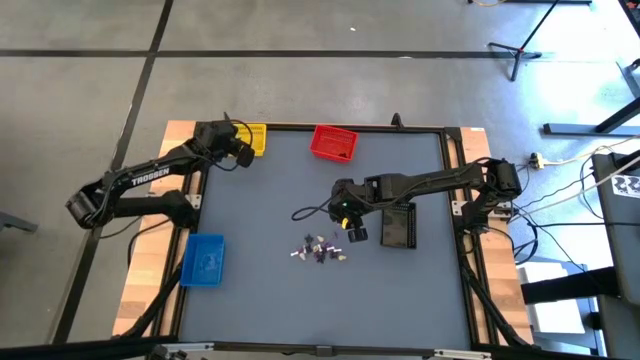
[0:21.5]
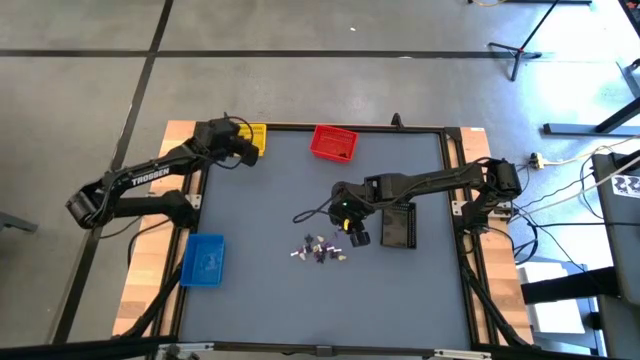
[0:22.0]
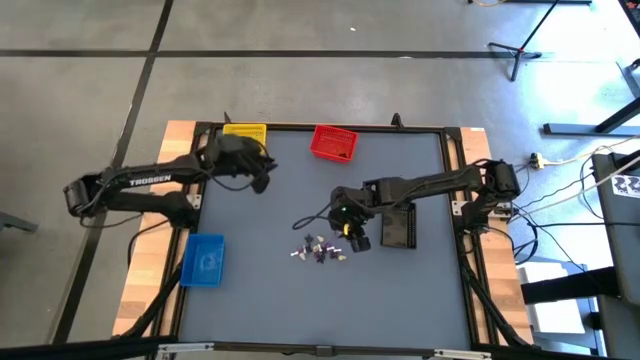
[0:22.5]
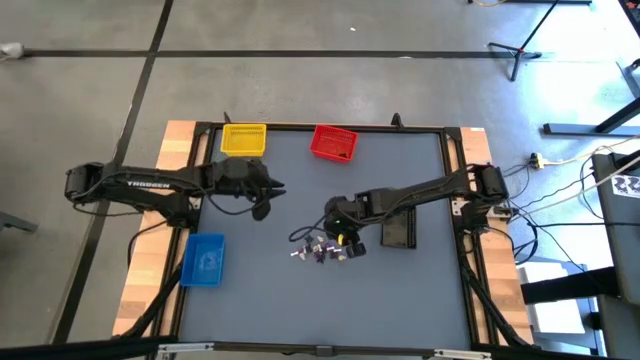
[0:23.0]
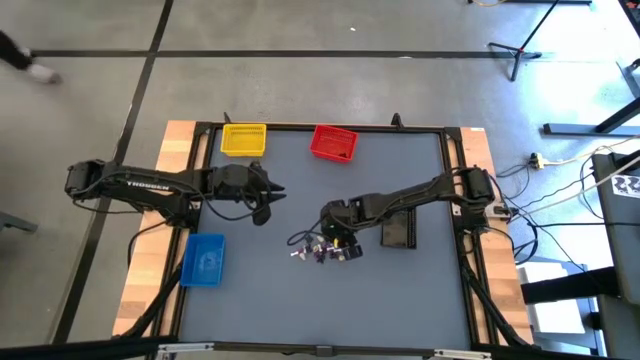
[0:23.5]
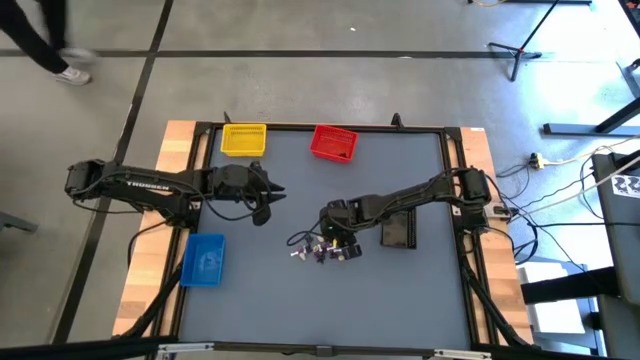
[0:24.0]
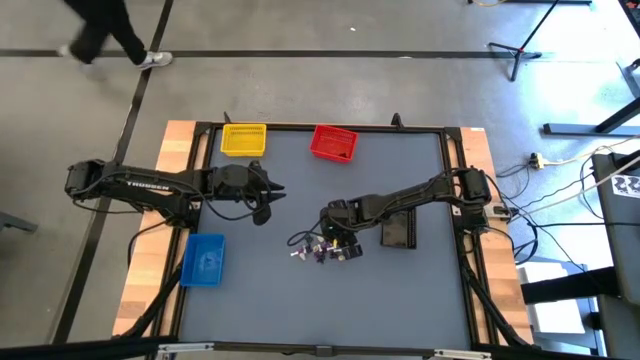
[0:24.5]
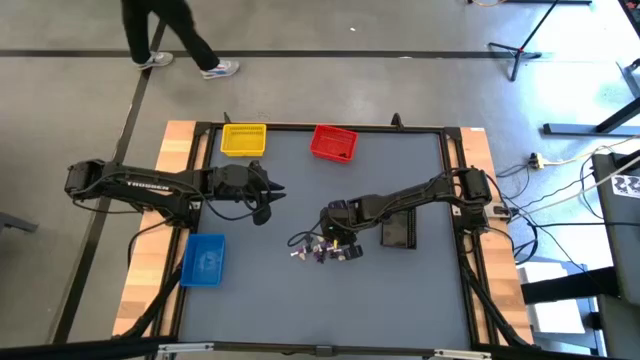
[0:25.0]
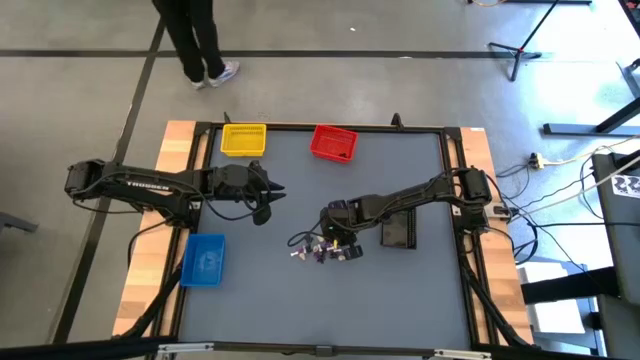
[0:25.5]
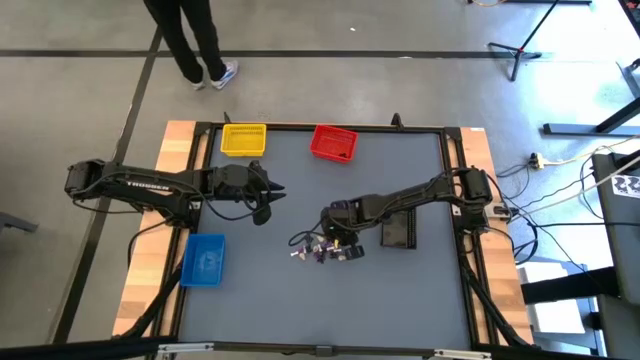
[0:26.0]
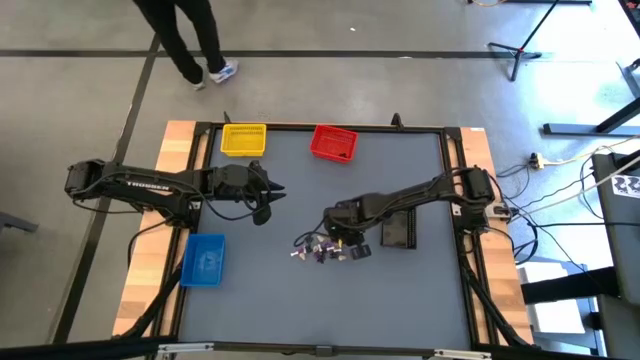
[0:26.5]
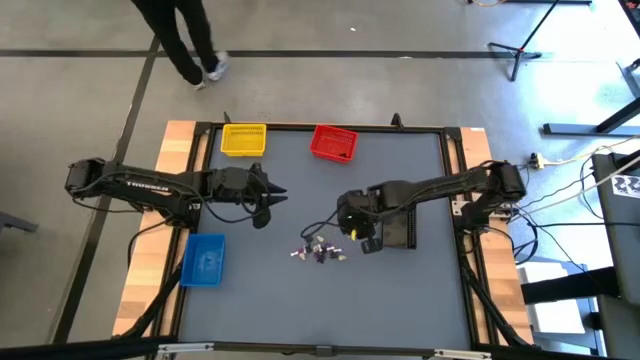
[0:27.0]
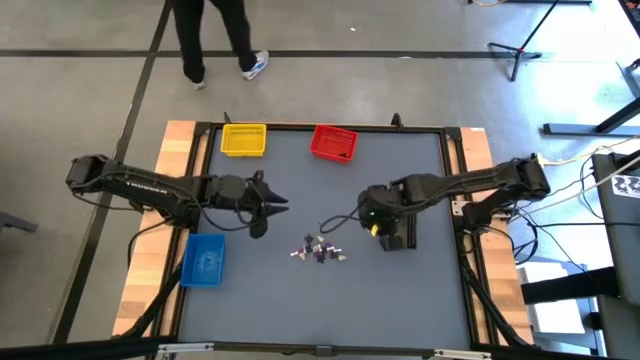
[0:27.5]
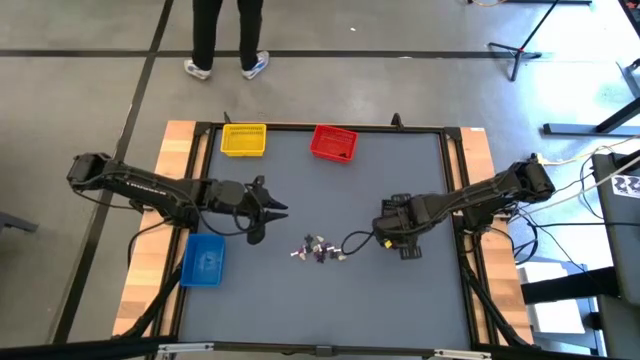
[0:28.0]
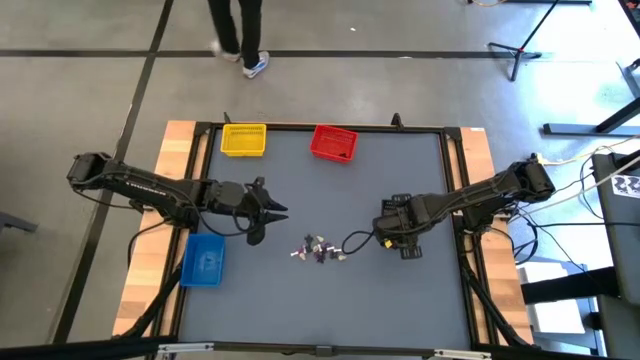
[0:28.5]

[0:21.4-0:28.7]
Task: Sort Halloween decoration
Put the purple hat toy into the black bin

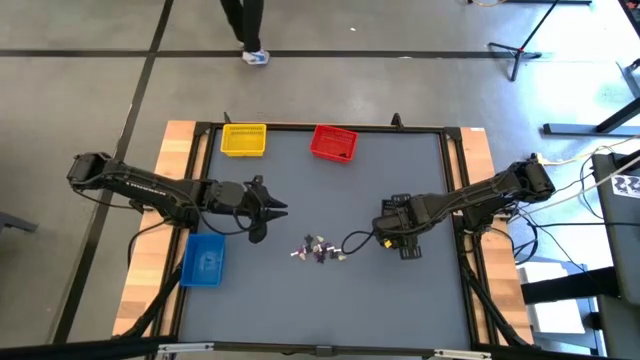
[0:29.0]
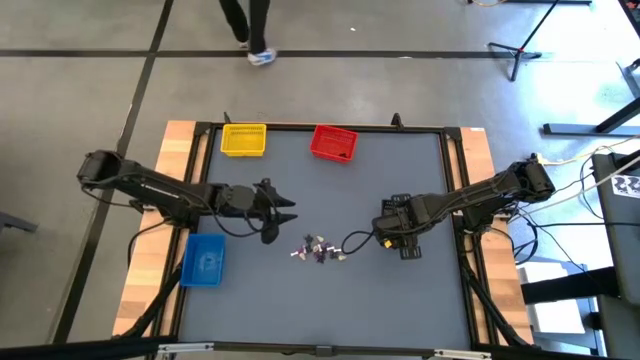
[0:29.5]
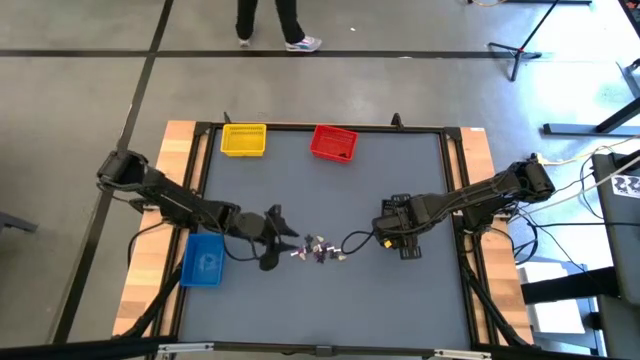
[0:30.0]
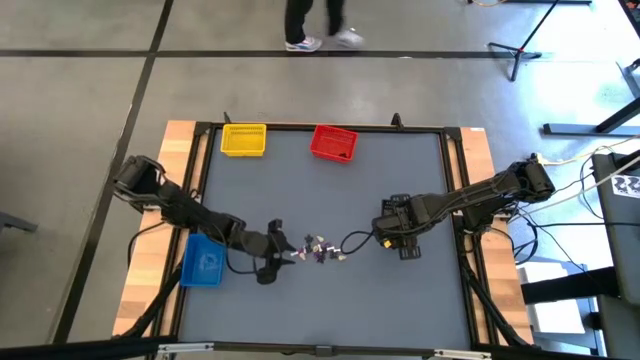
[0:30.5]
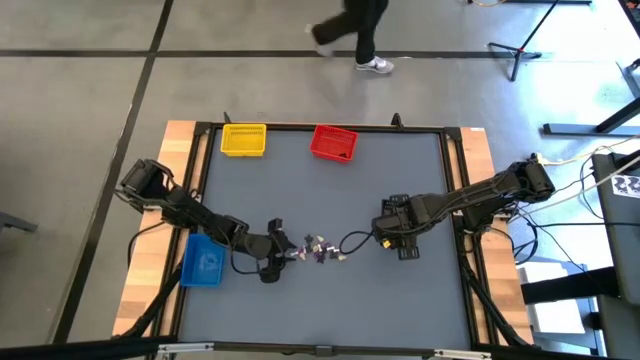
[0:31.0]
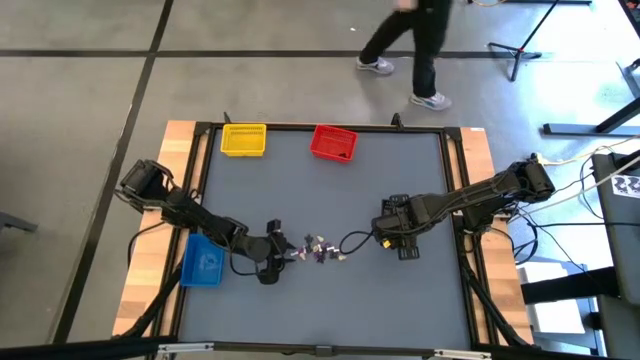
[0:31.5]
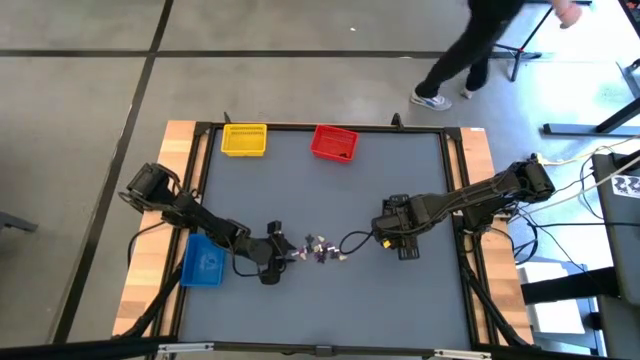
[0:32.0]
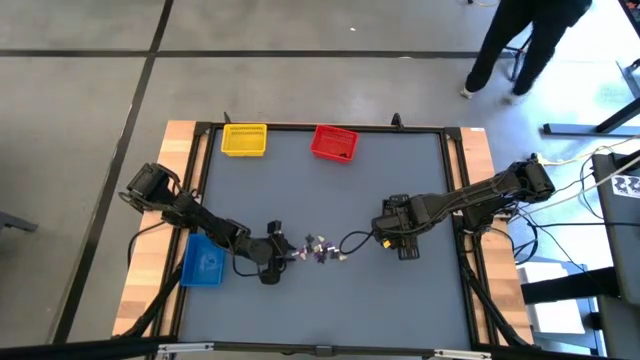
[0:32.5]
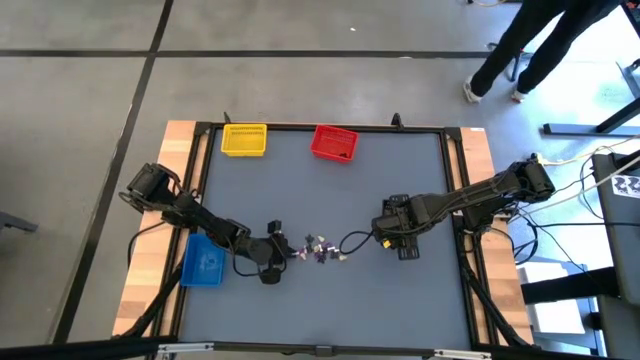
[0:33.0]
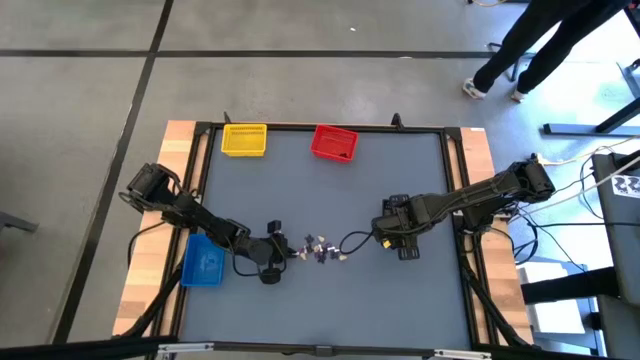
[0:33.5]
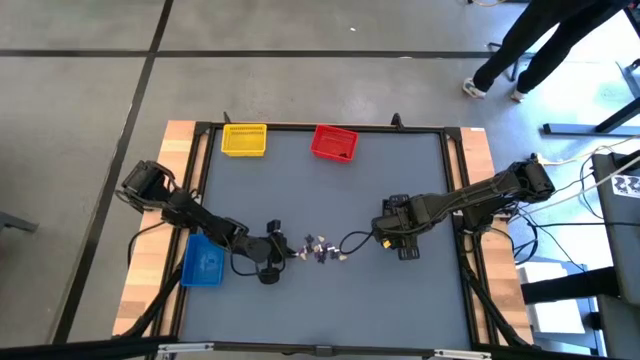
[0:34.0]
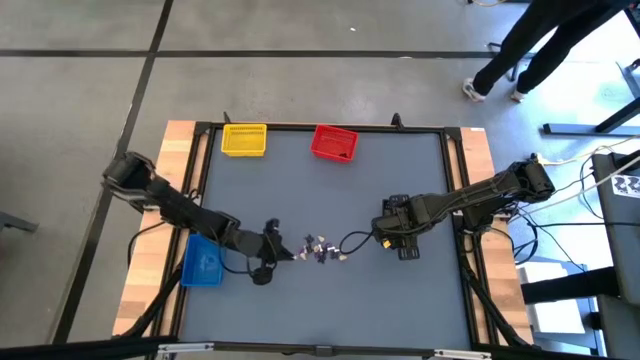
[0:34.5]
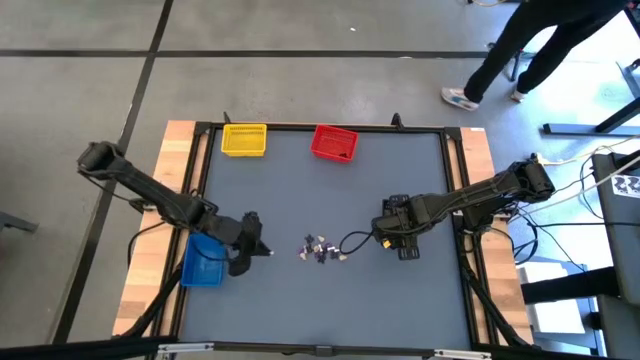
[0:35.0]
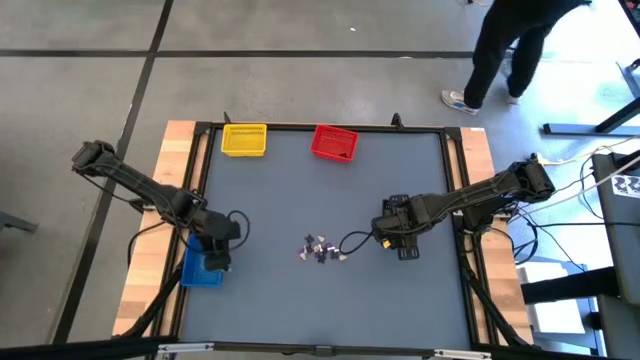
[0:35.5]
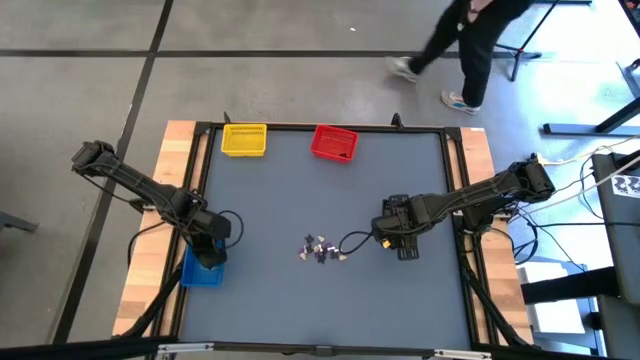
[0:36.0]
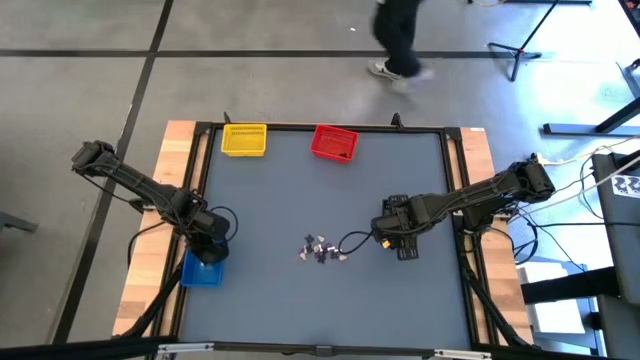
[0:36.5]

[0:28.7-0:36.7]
Put the white bone toy into the blue bin

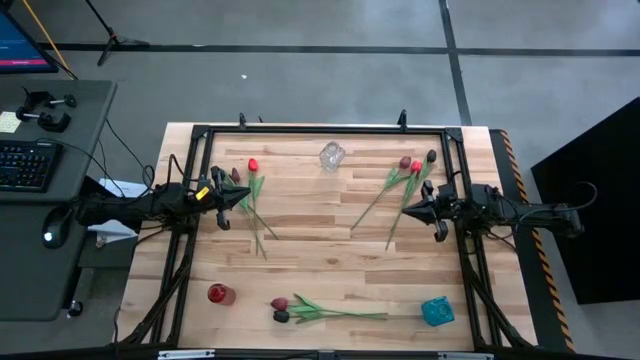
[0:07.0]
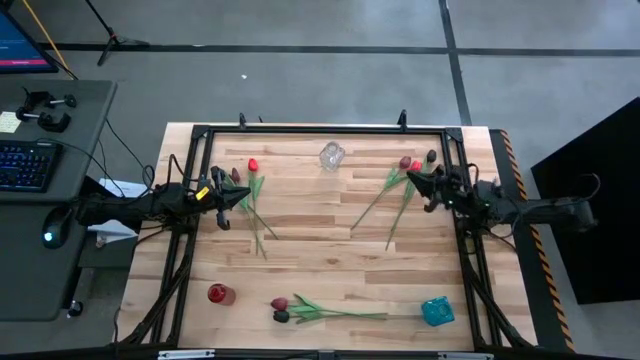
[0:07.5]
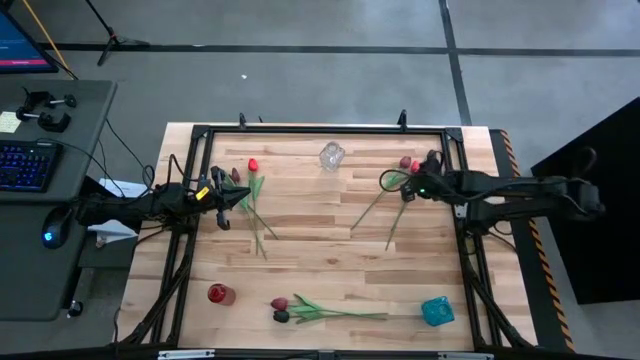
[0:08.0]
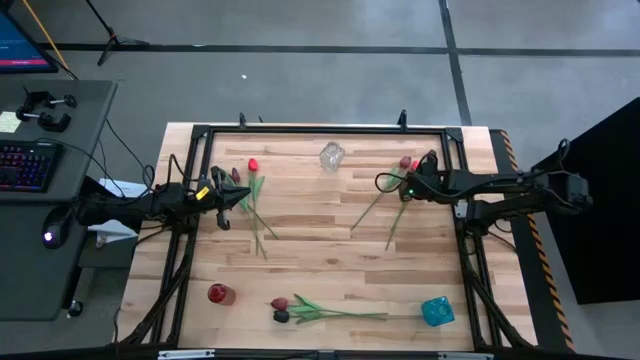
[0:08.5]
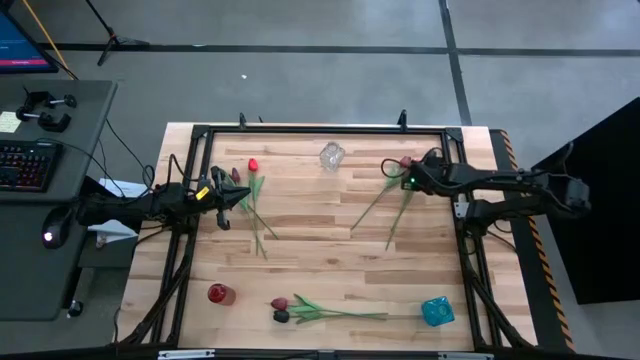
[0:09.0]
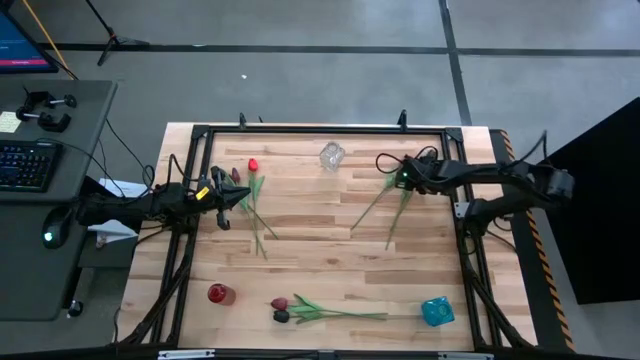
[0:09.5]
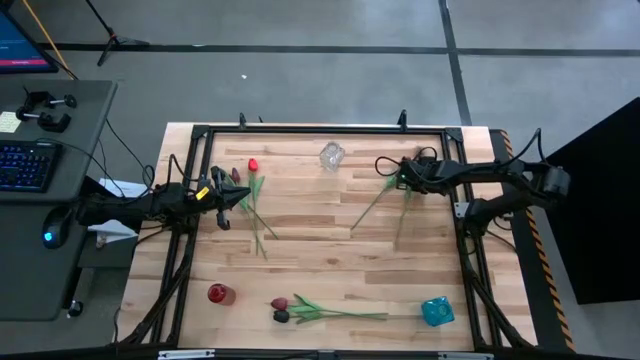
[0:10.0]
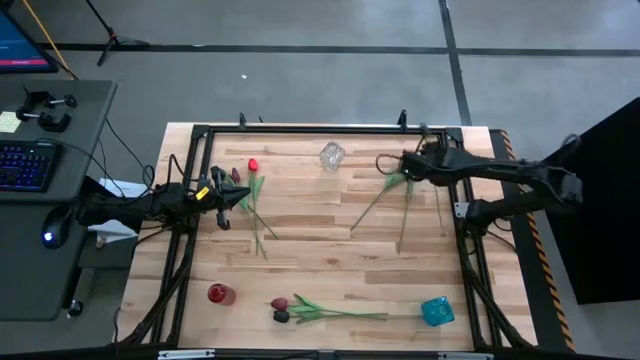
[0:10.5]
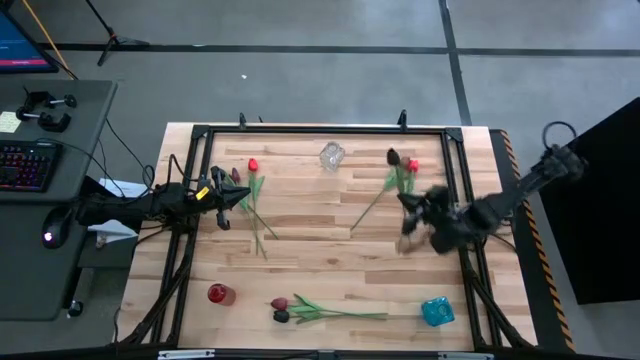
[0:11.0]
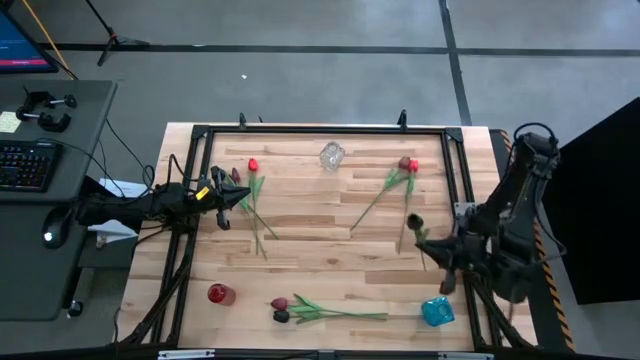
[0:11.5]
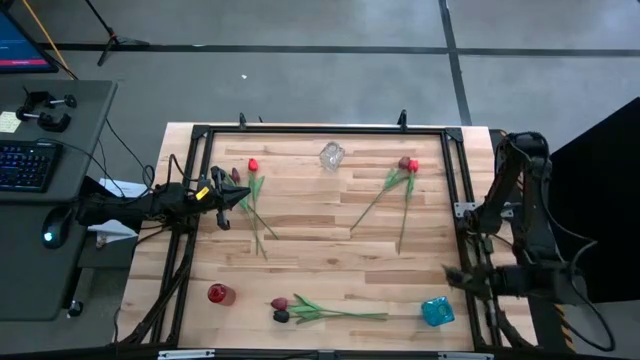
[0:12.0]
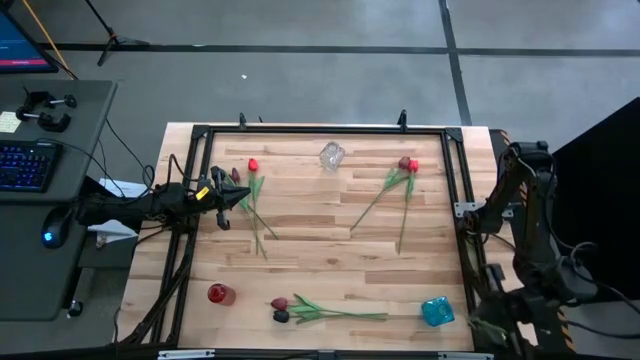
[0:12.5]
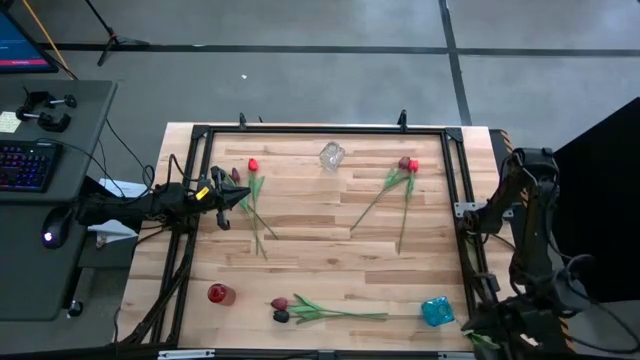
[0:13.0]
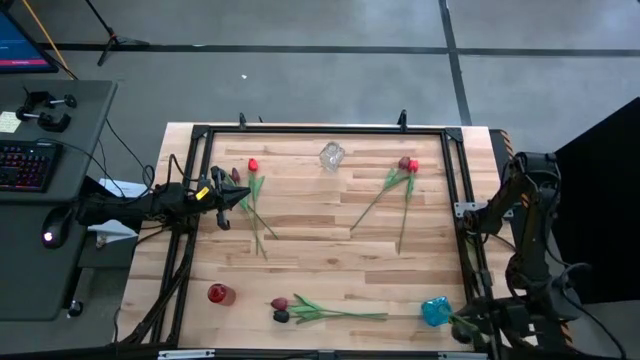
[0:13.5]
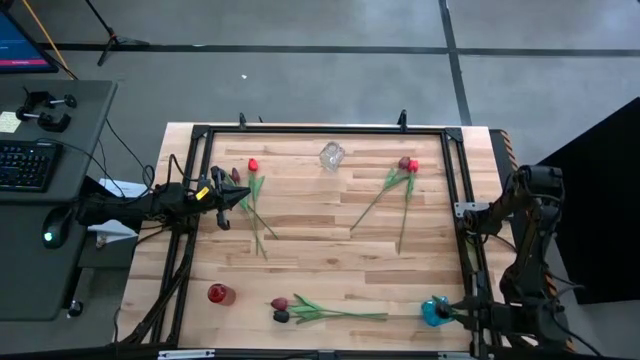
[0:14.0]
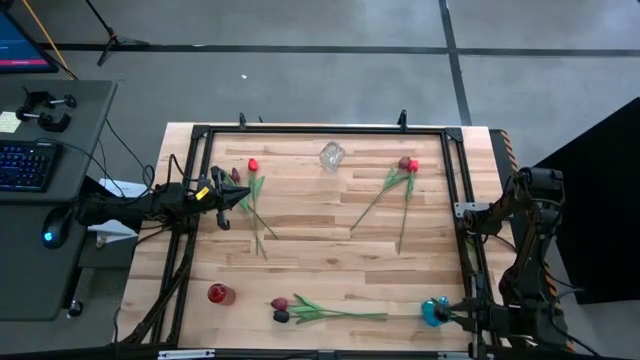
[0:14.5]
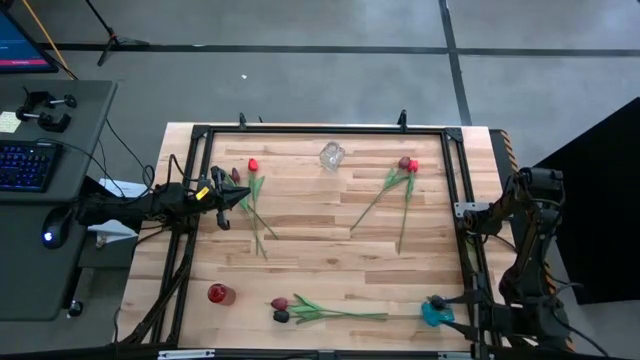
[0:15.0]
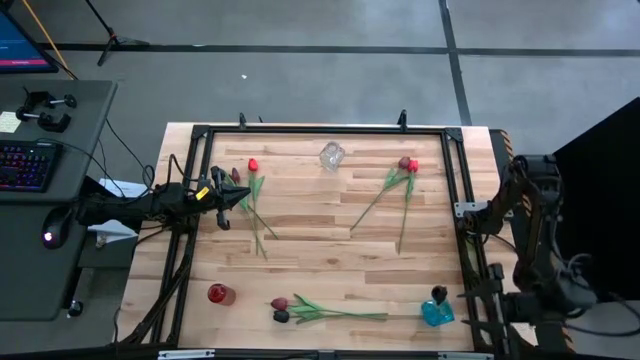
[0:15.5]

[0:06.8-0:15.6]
Task: Sort flowers into vase by color
Put the top right black flower into the blue vase
